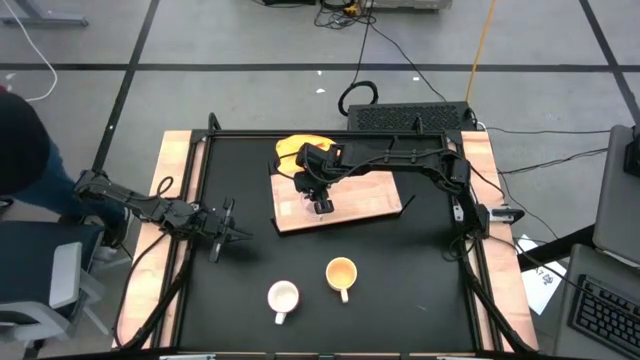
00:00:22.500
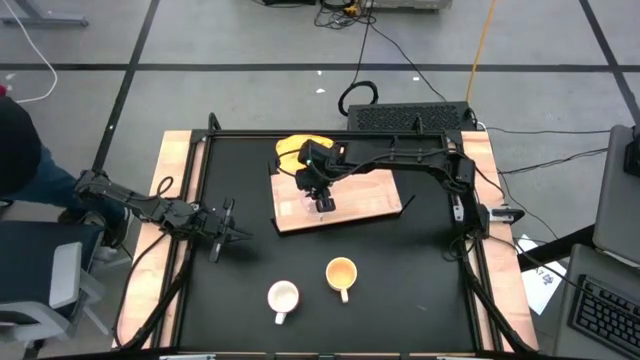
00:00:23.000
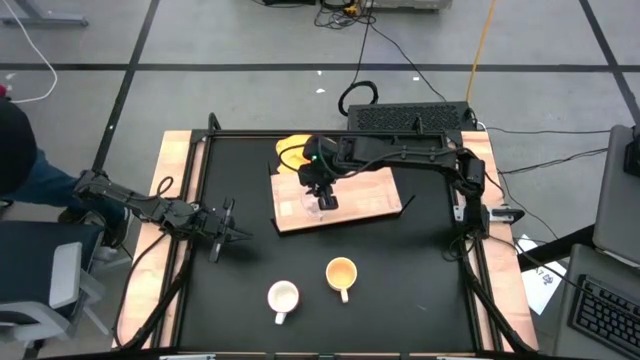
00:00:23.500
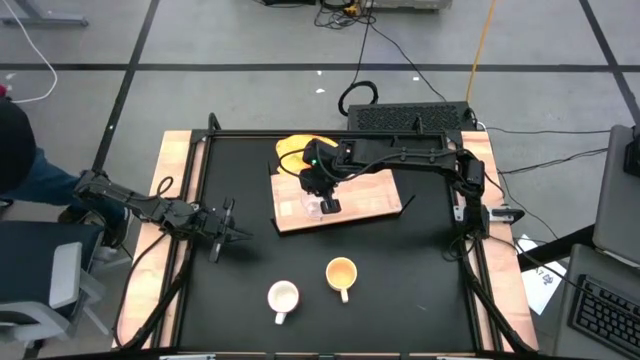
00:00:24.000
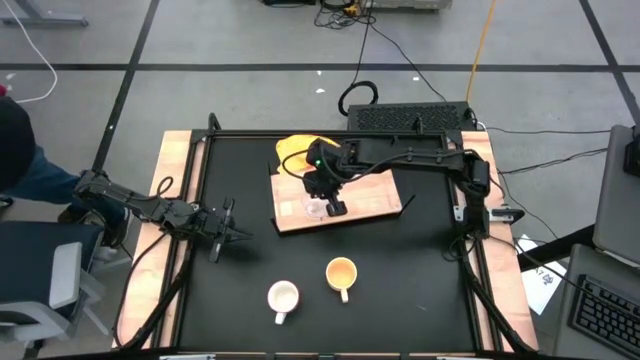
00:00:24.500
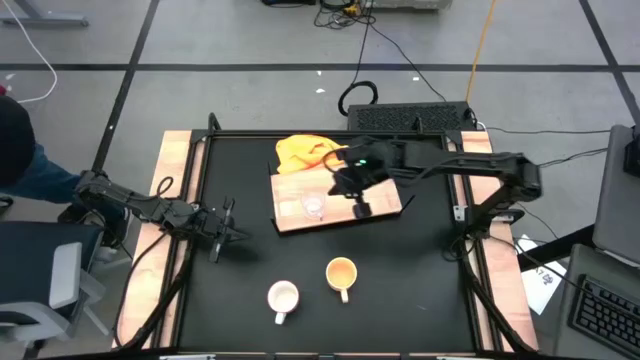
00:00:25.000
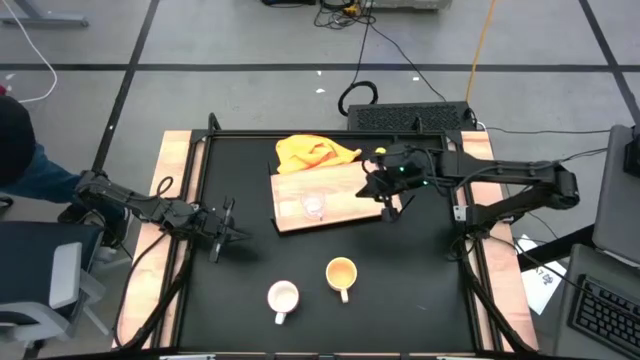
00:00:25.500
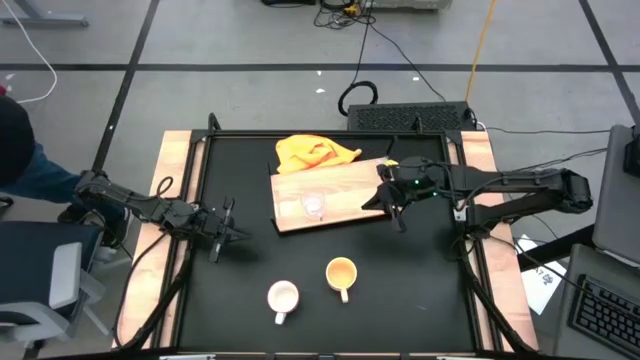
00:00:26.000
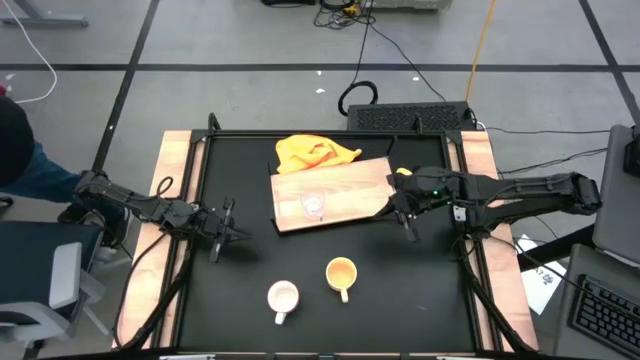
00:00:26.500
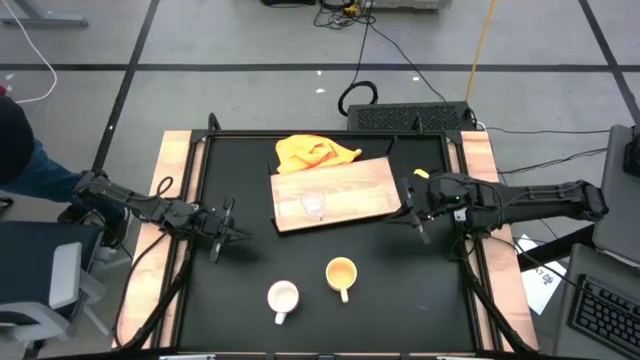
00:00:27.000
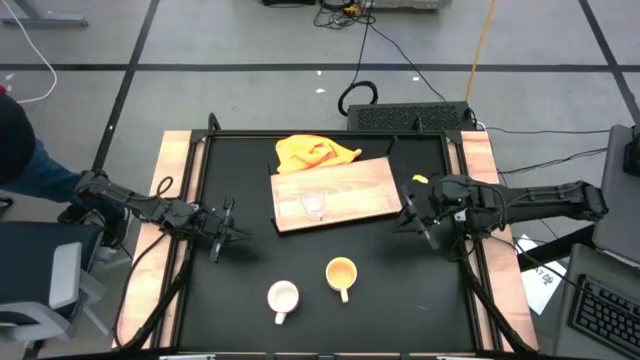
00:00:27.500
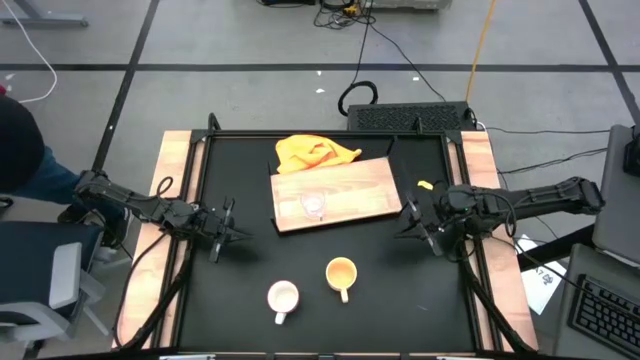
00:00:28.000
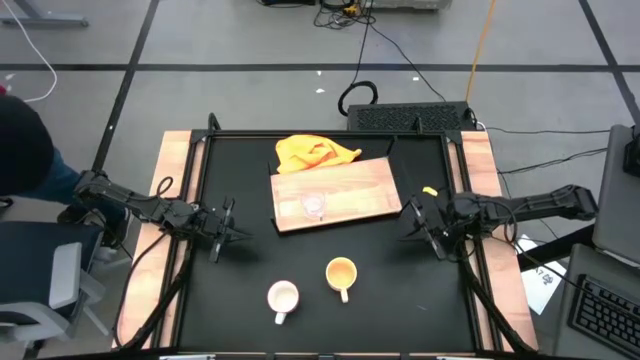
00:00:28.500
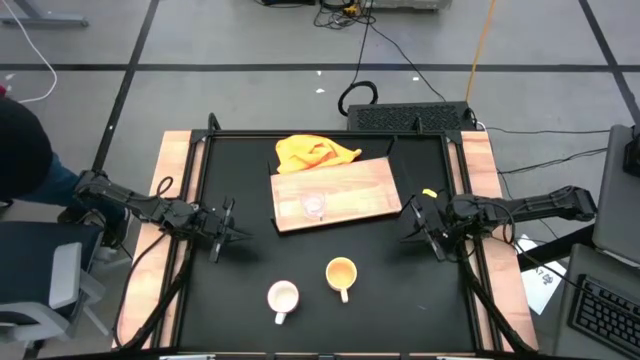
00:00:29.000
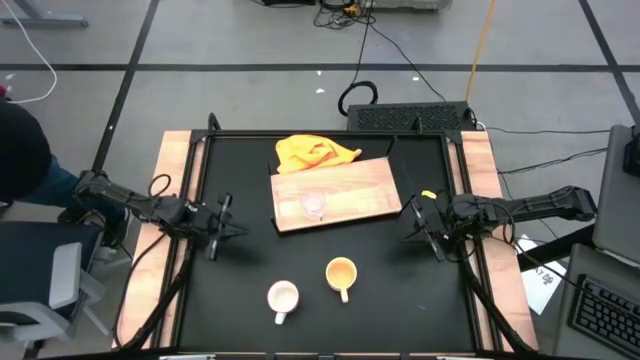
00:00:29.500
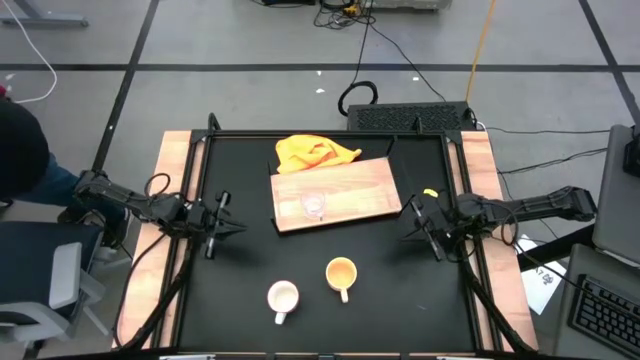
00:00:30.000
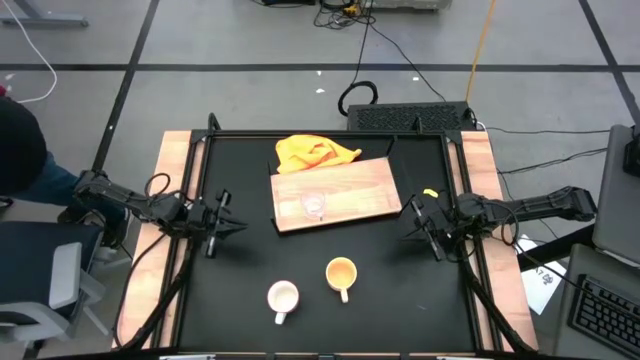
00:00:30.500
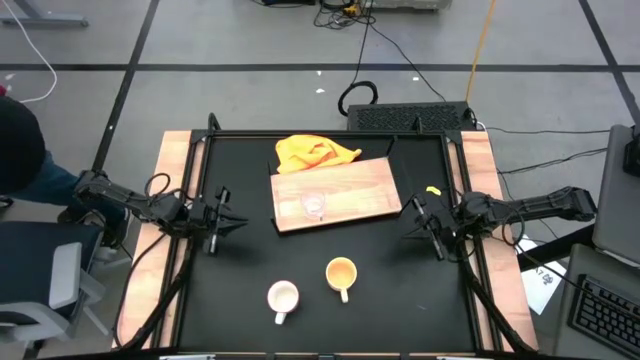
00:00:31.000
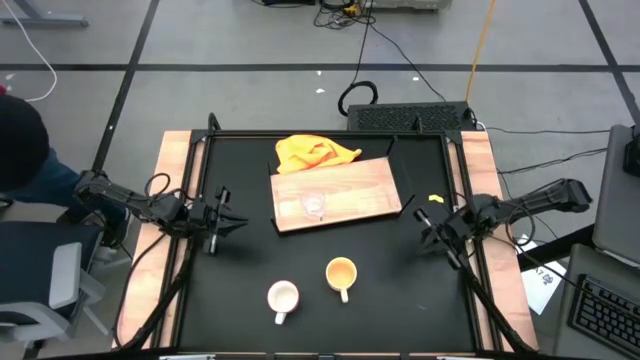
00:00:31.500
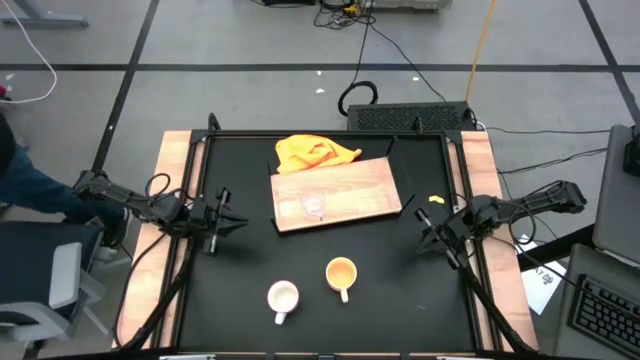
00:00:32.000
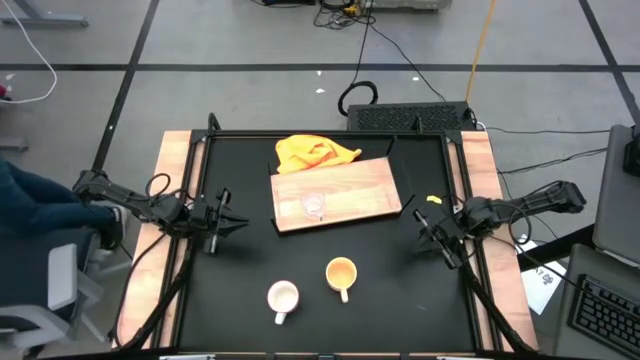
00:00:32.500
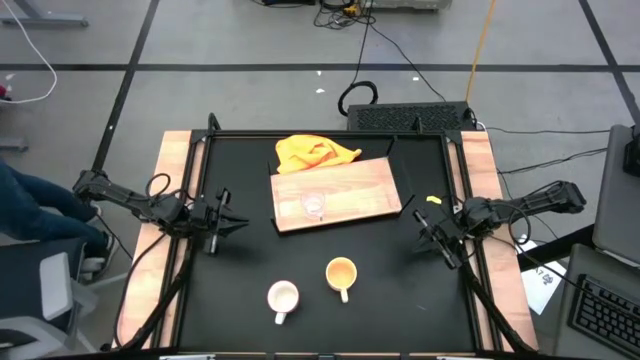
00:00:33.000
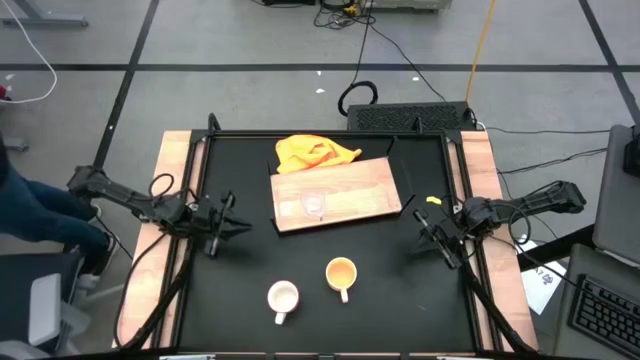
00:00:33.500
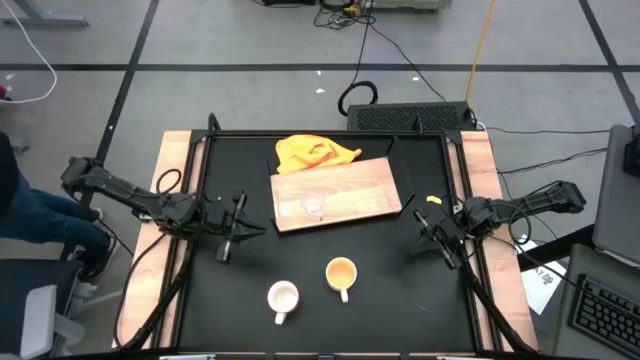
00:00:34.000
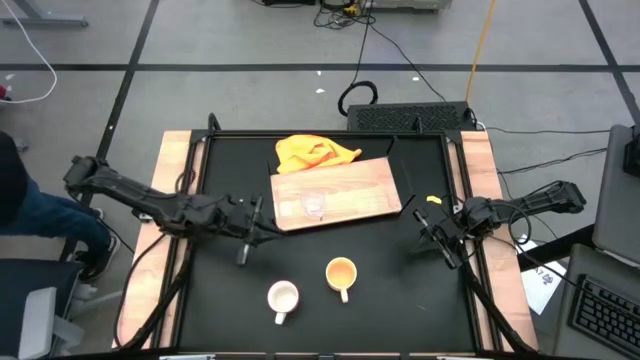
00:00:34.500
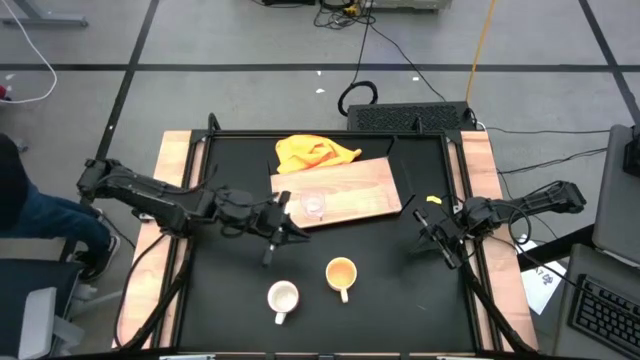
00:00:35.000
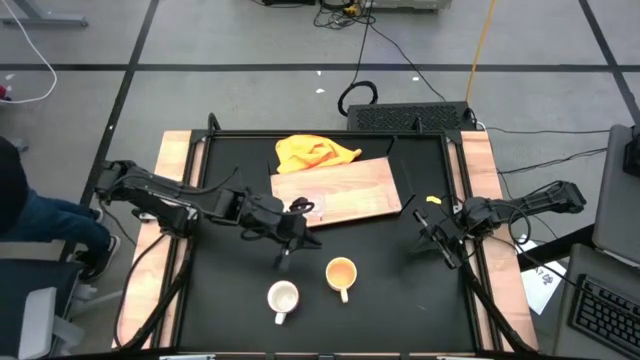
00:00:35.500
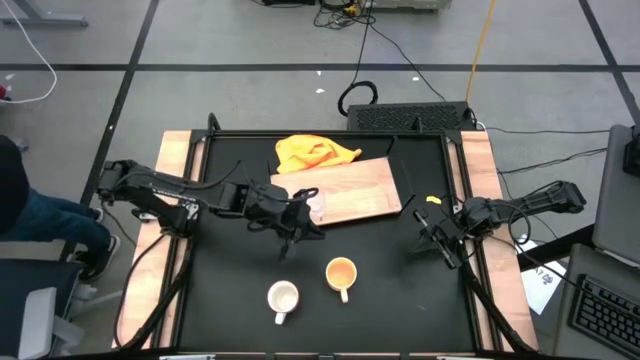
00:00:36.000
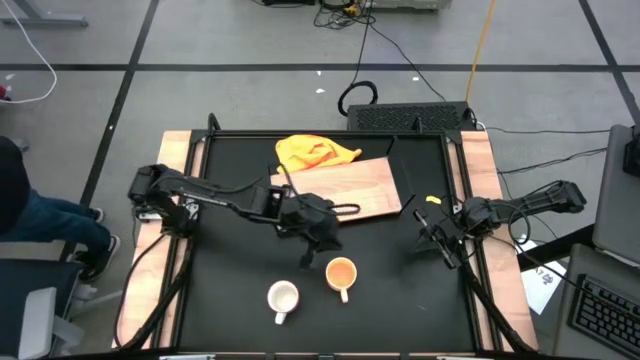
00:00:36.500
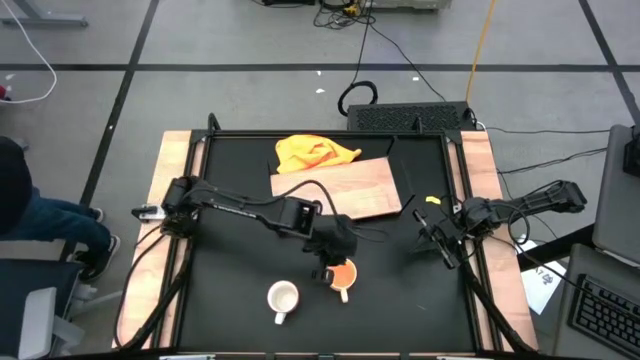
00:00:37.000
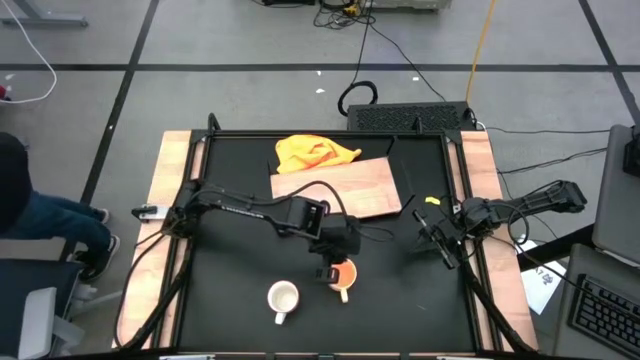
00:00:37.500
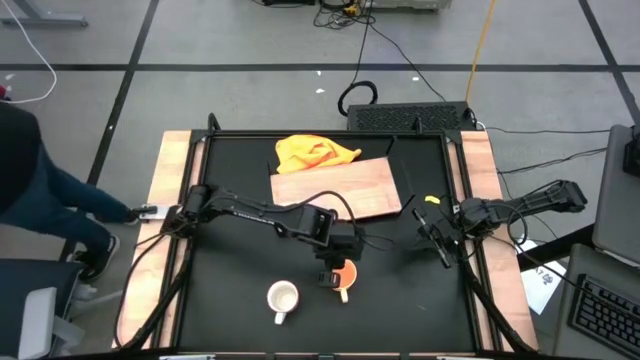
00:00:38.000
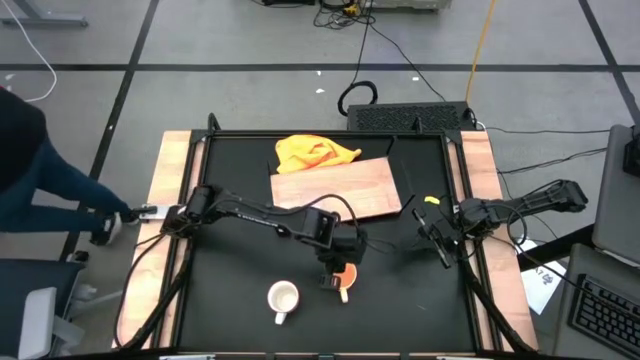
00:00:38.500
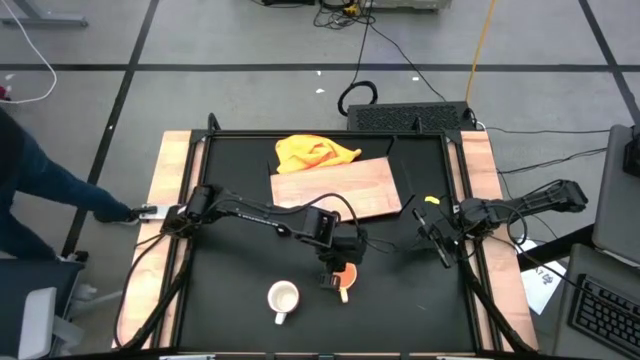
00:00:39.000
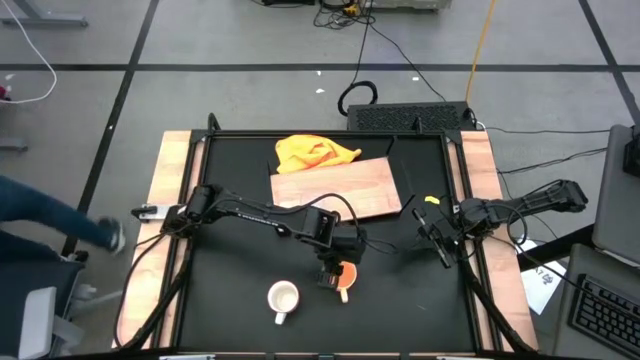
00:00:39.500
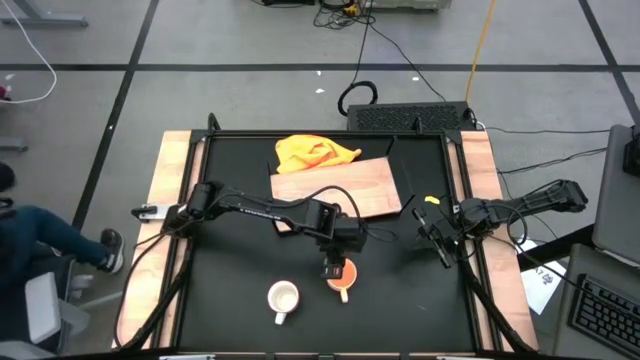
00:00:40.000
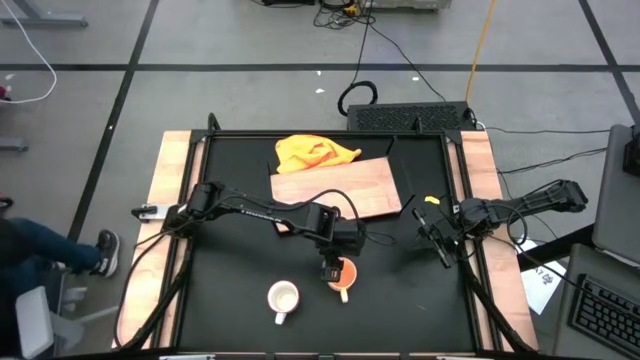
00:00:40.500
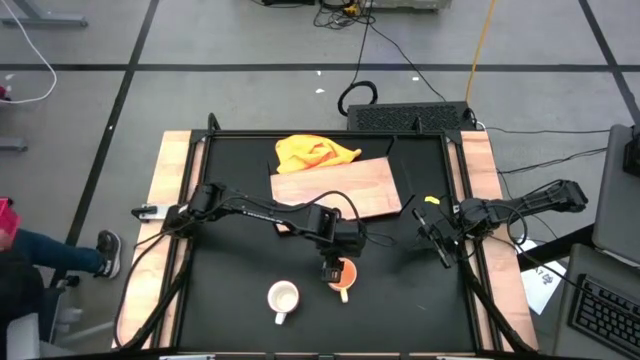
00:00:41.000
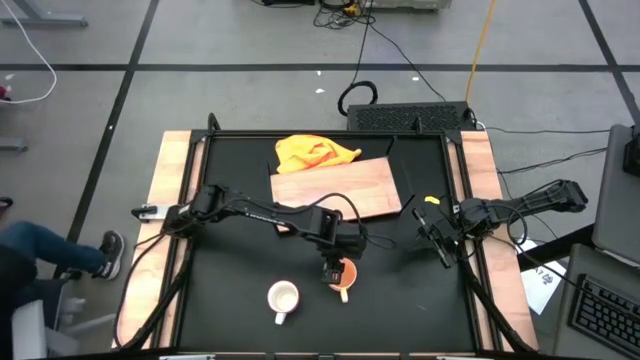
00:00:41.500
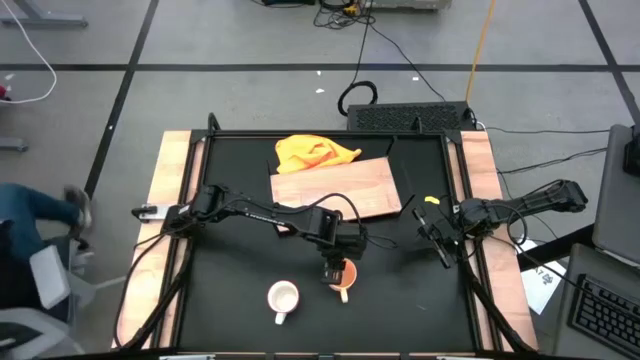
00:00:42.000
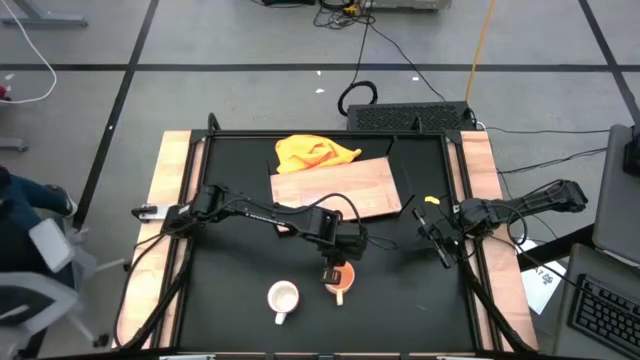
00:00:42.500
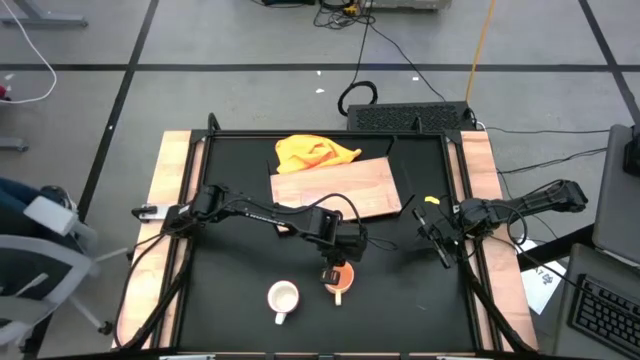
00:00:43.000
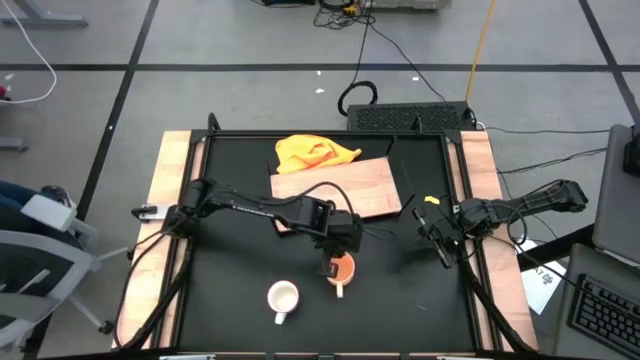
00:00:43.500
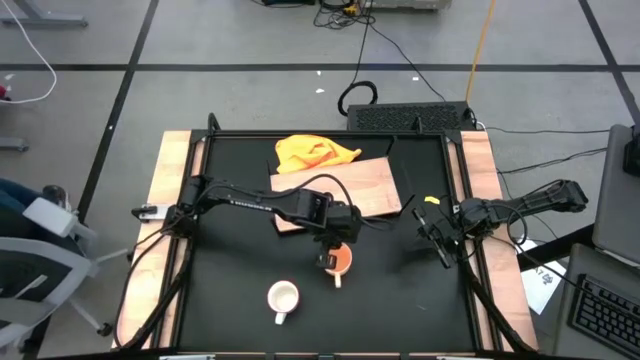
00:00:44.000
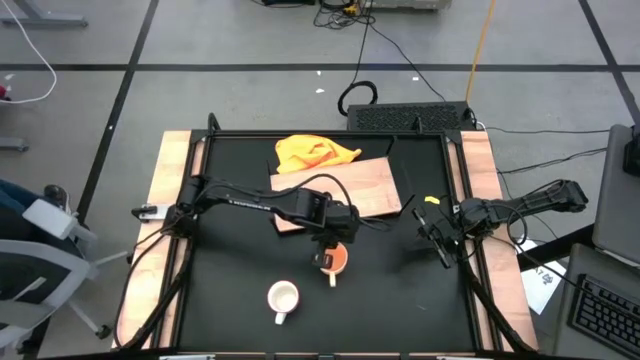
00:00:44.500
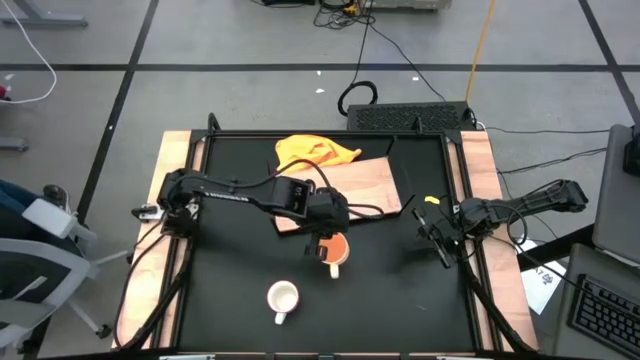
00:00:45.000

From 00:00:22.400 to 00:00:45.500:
Task: Stack small to large cups/mugs on shelf
Put the orange mug on the shelf
